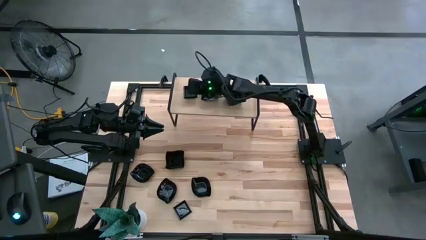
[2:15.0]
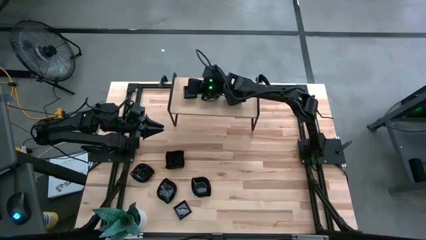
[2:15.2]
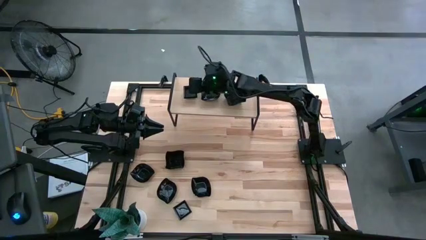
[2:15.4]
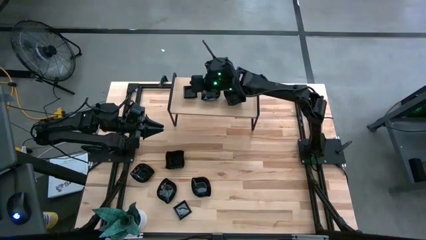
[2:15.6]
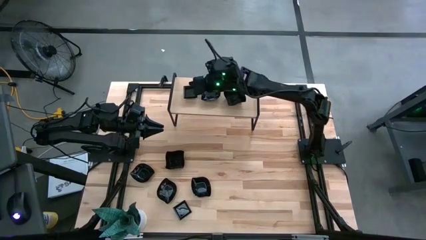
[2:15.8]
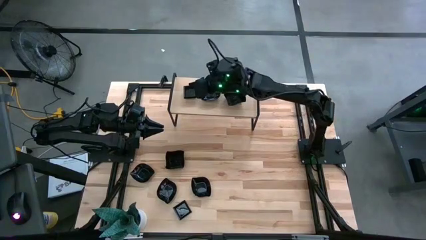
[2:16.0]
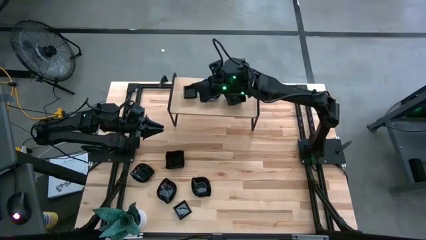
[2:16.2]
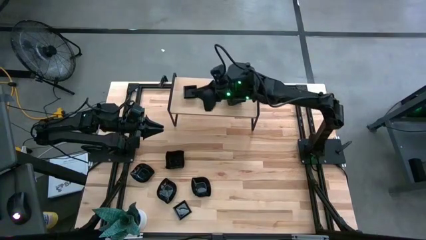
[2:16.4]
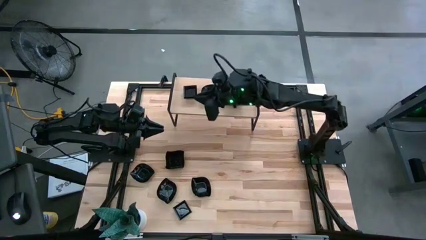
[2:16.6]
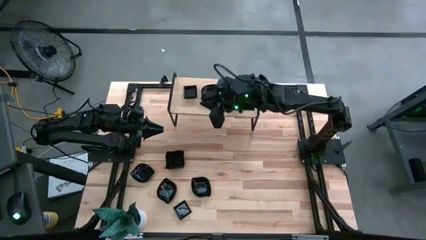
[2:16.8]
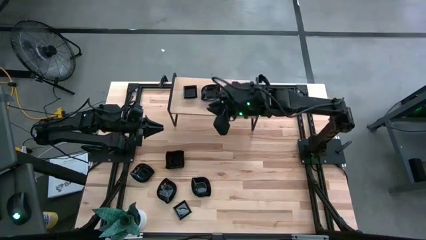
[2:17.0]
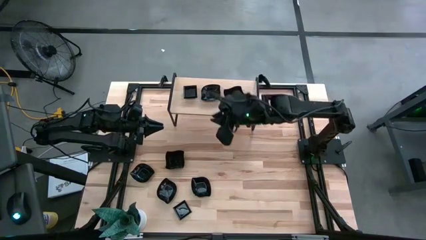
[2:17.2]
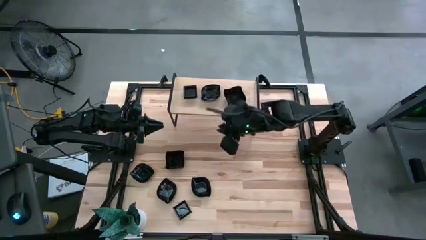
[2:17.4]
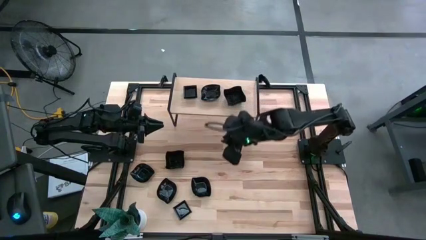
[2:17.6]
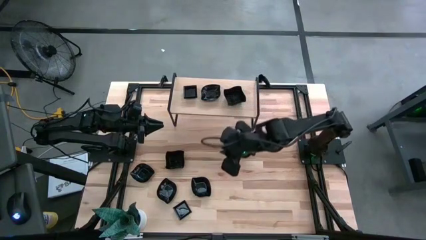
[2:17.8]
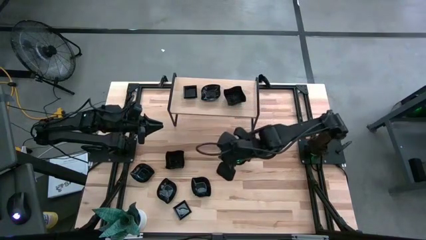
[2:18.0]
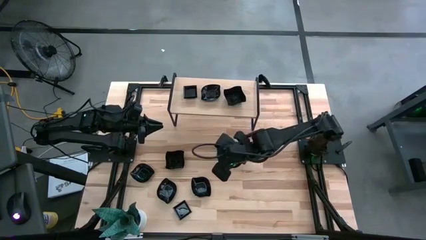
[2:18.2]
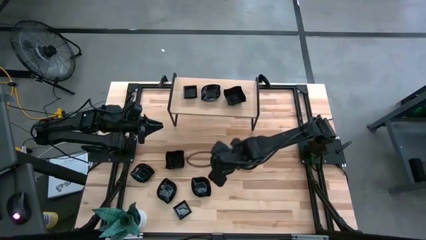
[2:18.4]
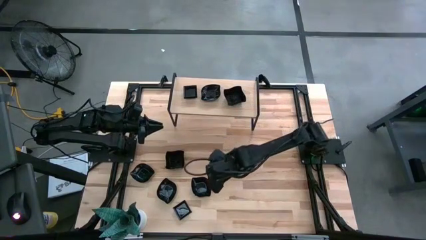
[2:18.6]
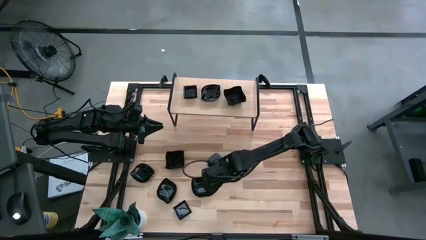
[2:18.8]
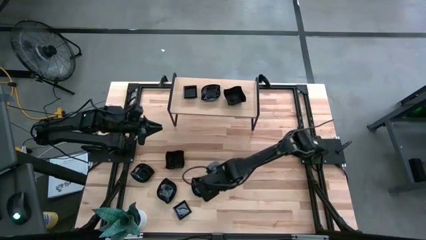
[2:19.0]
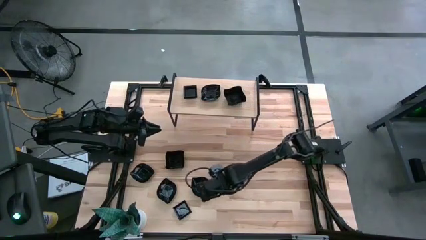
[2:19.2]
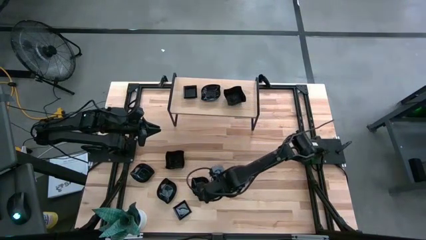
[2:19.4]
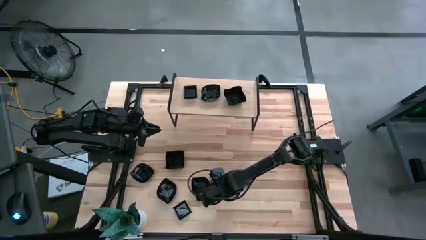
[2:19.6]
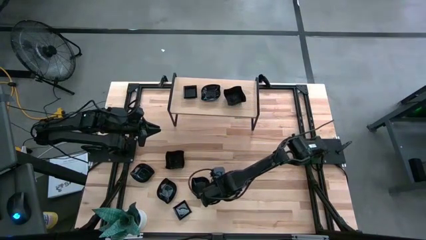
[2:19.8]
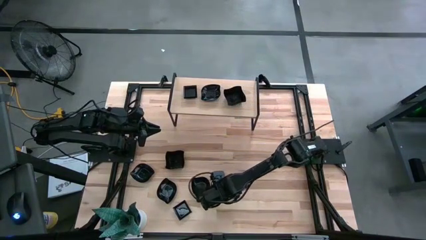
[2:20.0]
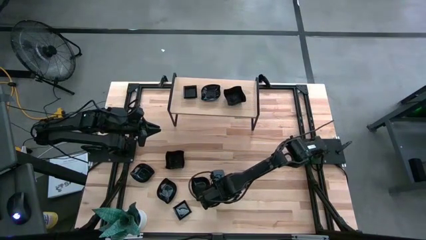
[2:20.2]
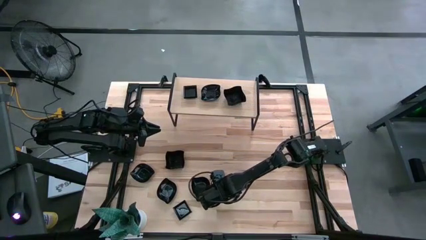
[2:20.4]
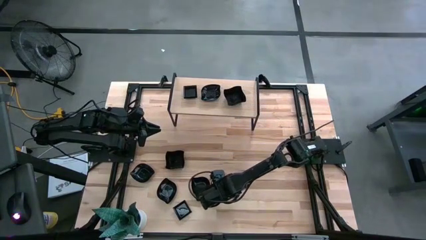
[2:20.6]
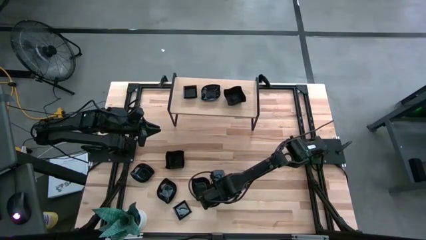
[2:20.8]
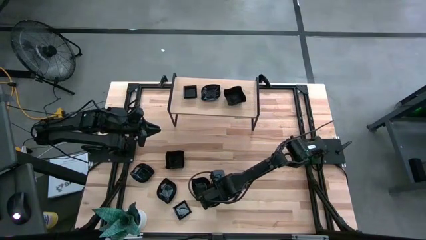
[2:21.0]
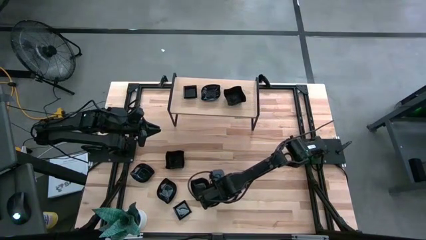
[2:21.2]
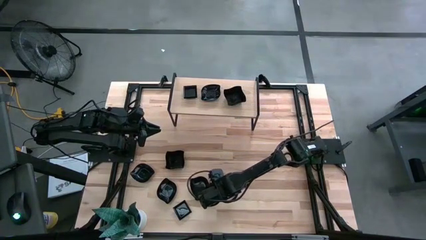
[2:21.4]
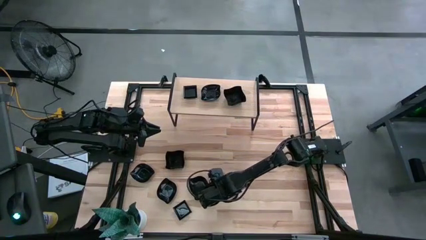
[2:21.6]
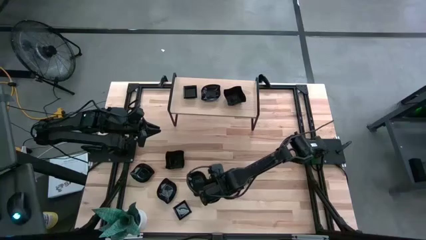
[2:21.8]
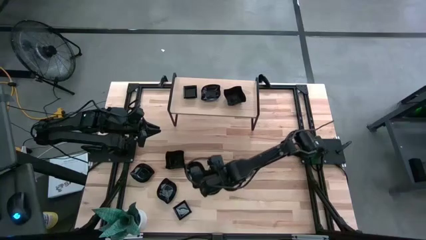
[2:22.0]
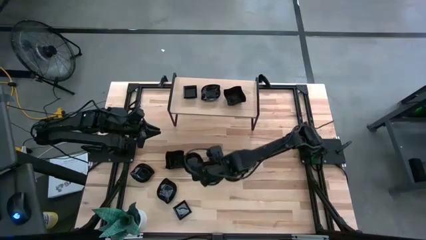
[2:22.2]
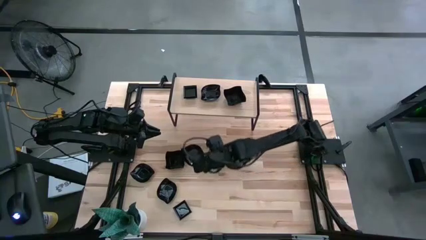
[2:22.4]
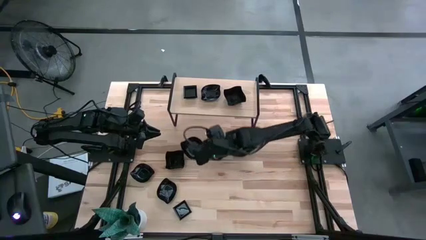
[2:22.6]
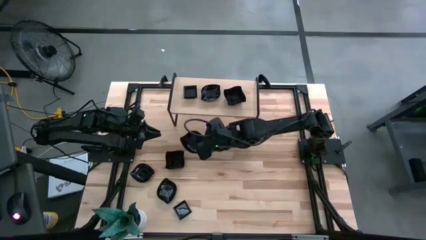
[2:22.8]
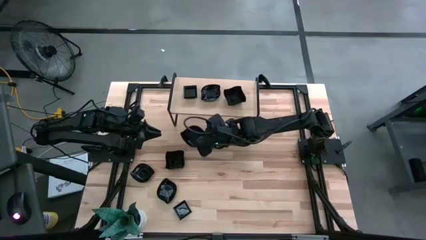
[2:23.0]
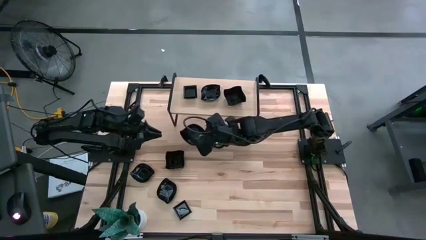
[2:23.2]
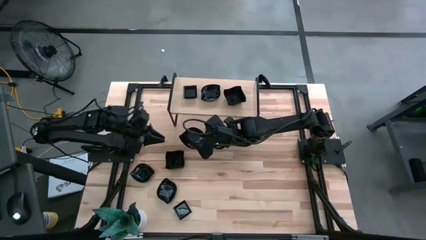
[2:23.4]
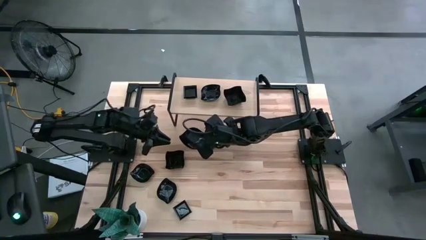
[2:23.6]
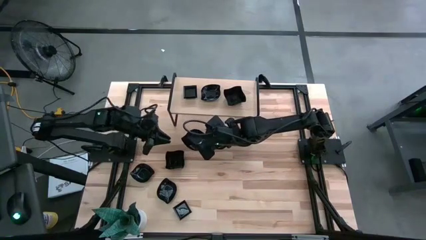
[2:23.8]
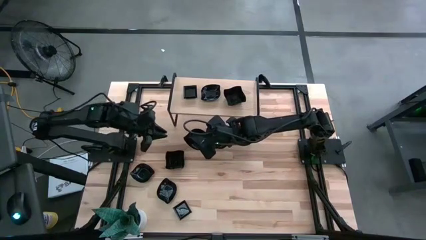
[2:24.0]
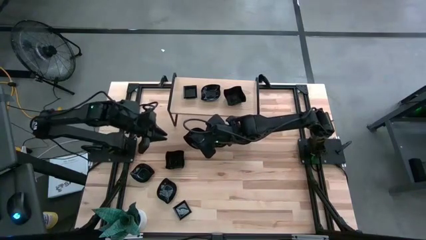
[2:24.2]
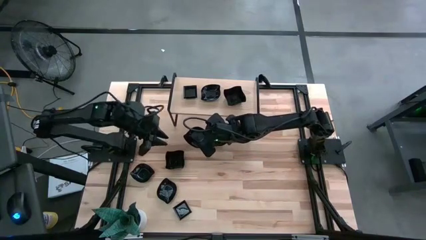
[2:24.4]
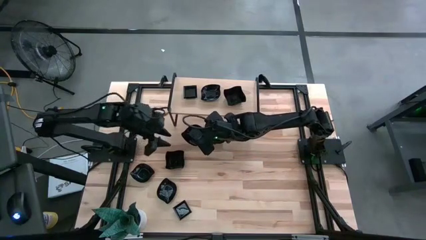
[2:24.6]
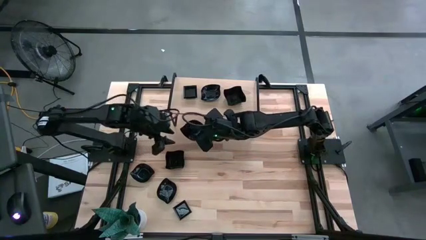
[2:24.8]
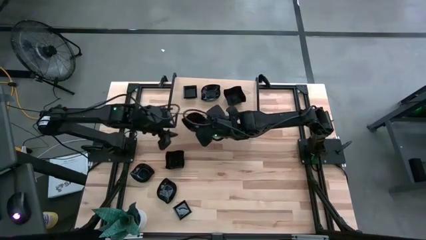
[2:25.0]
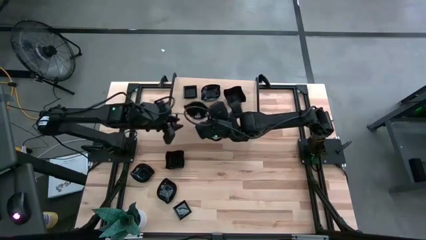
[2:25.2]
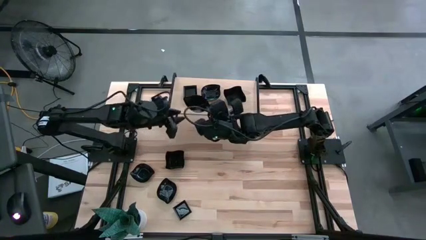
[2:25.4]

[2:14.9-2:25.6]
Task: Pick & Place Mini shaped plates
Stack the leaf-shaped plate on the leaf-shaped plate
